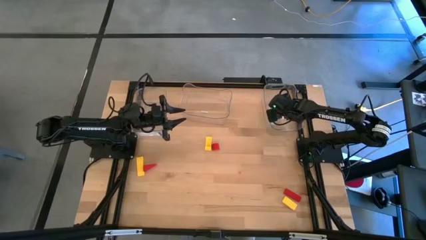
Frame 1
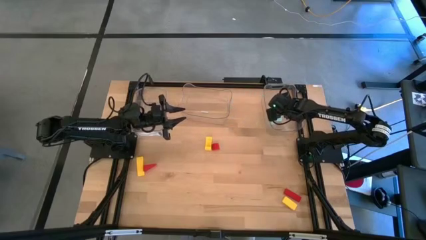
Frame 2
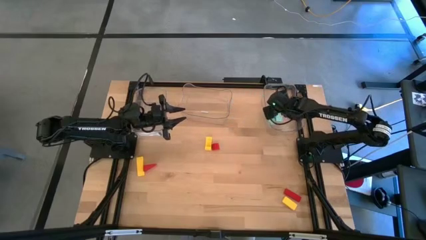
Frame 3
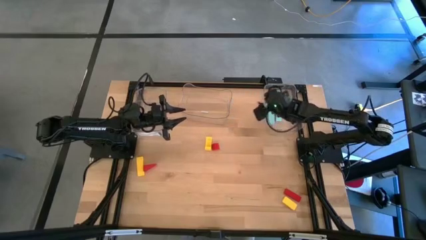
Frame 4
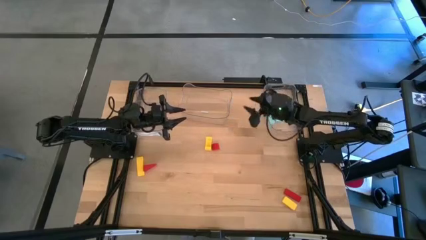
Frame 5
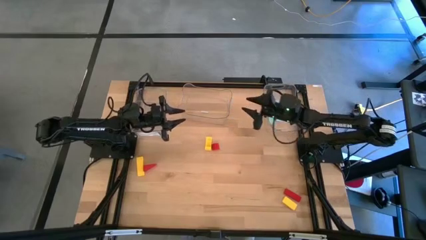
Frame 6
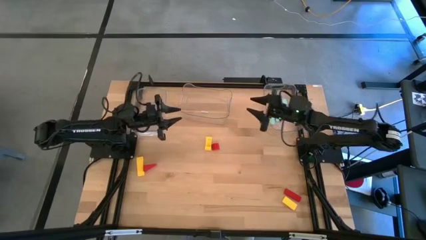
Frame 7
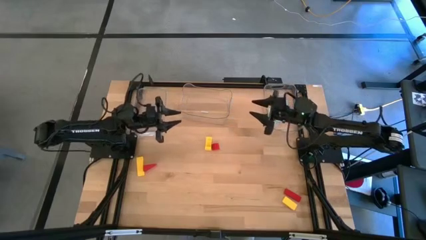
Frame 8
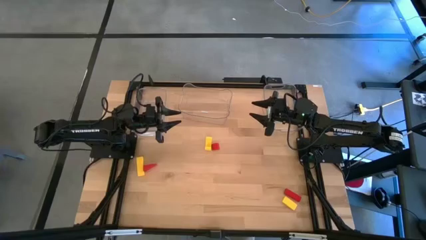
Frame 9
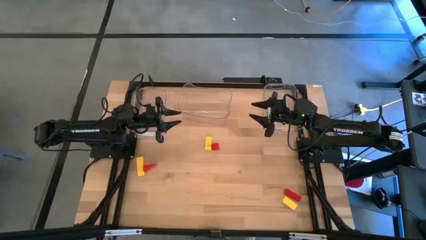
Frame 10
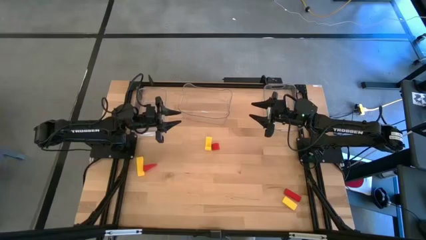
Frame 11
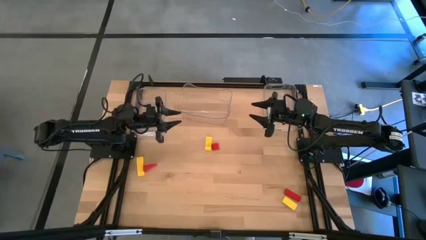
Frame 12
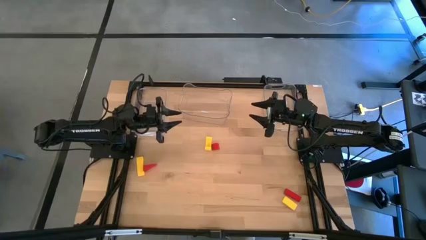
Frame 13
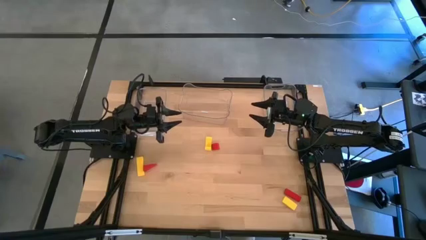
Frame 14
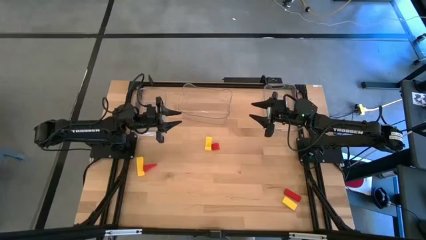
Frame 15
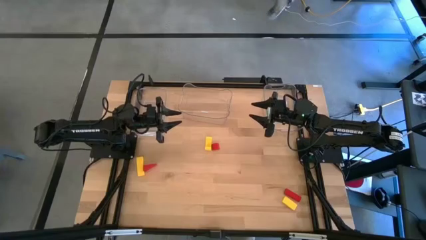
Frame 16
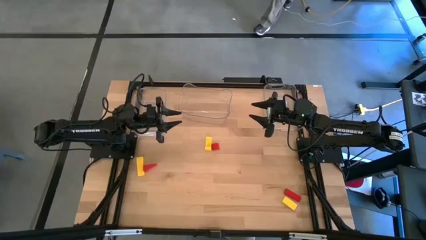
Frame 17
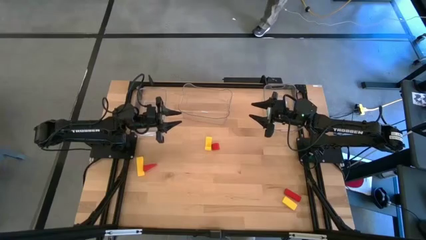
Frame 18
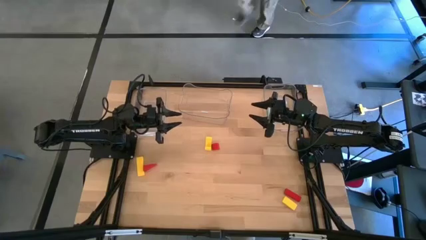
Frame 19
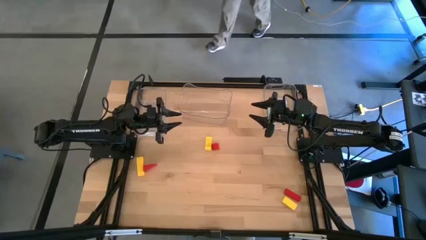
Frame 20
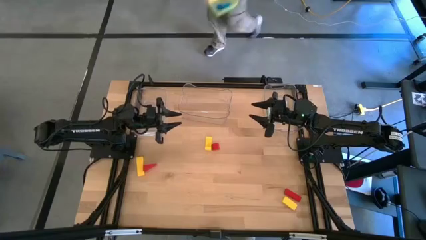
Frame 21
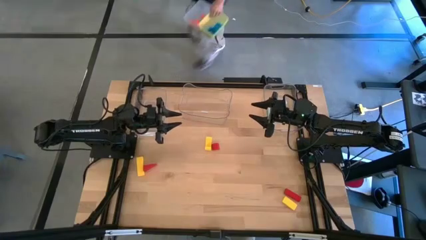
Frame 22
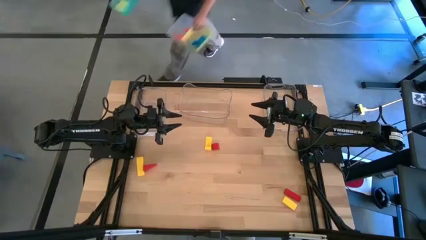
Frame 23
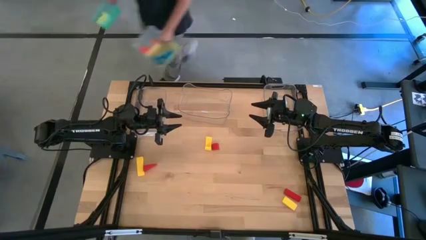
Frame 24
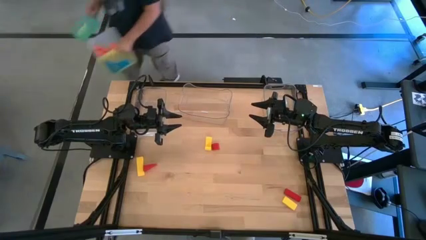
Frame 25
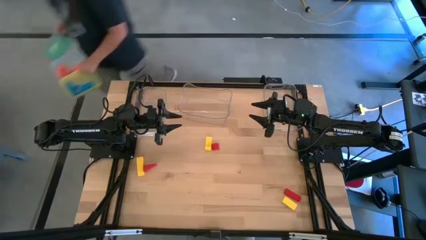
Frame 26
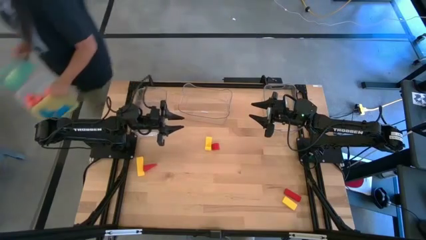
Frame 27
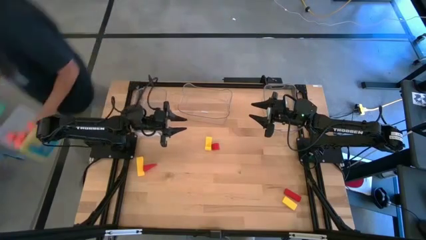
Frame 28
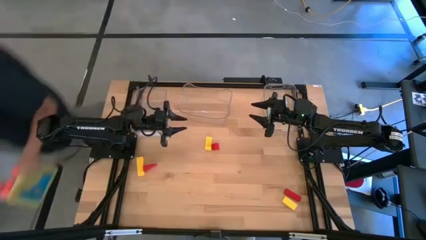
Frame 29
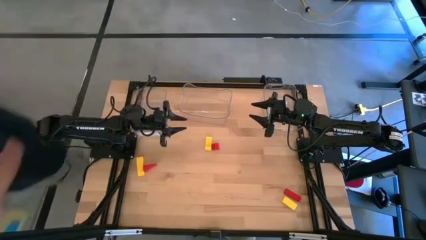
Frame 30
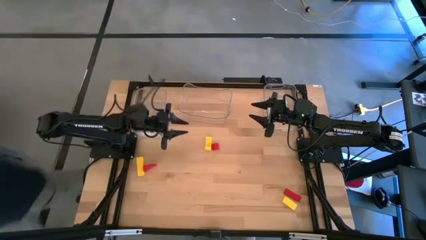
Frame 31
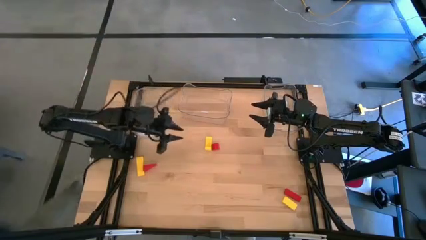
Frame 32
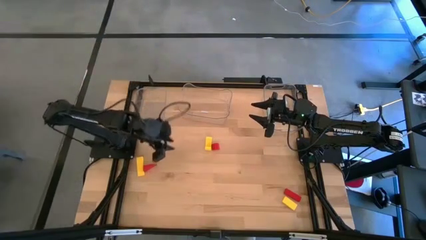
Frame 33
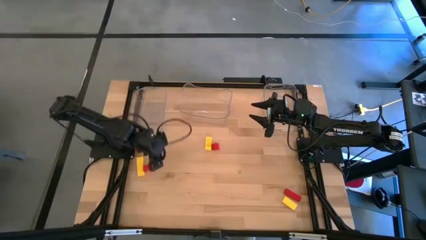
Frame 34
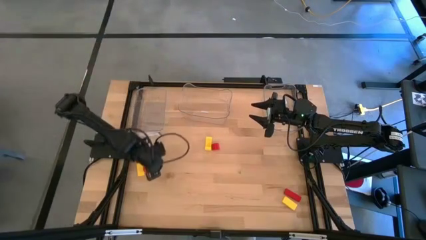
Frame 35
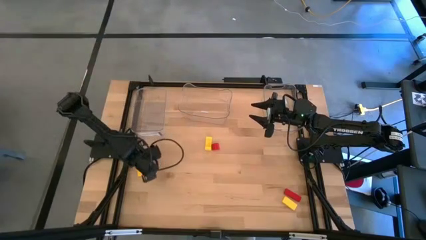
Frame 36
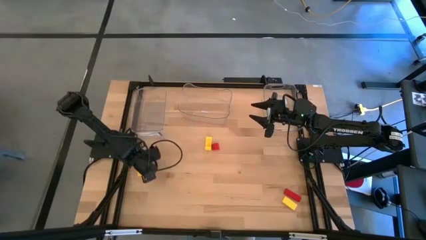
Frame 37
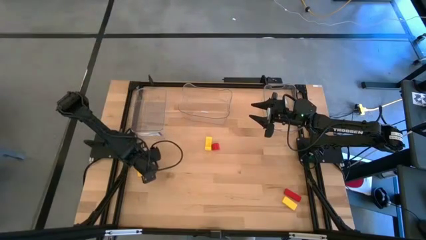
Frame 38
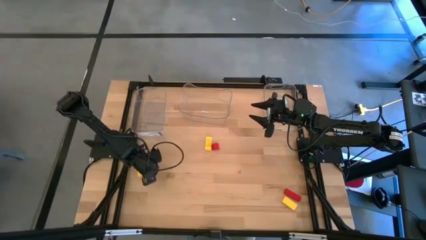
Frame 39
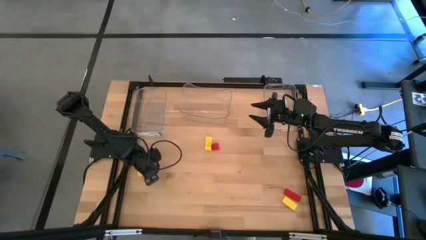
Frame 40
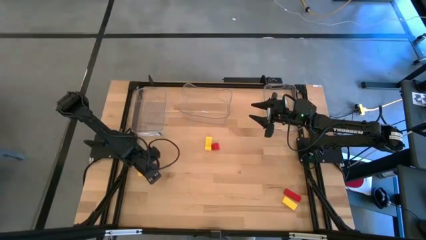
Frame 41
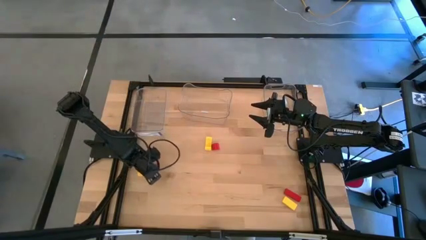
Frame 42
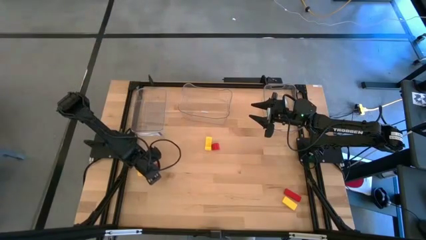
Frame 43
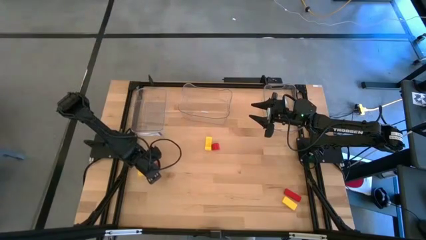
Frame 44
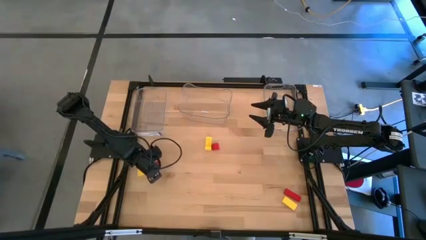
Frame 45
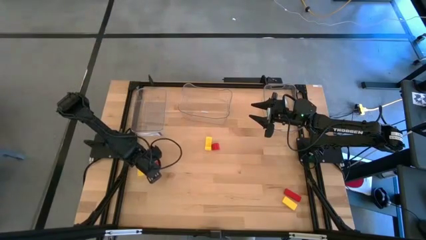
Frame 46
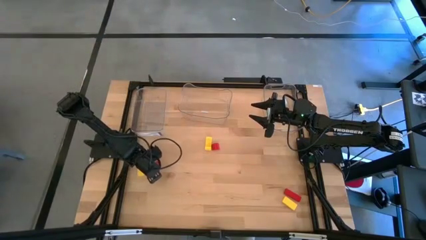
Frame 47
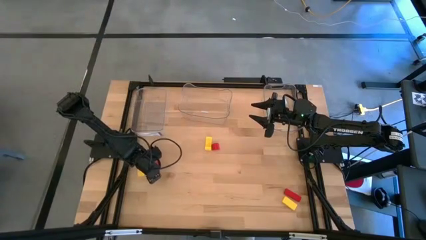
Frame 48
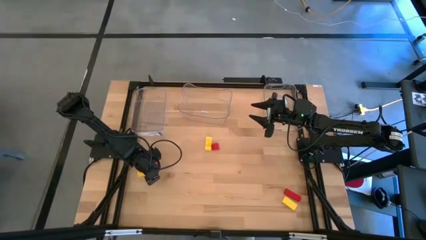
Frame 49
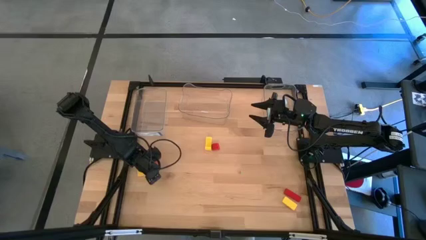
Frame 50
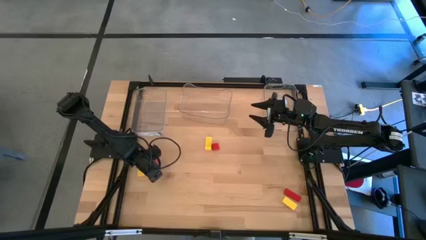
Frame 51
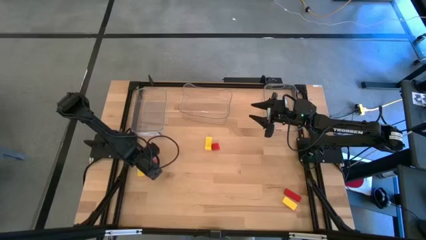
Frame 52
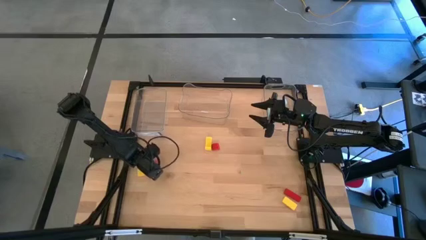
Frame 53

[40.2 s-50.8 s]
Task: Sort & place blocks by color
Put the left red block into the middle transparent bin

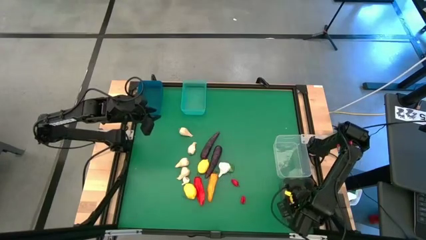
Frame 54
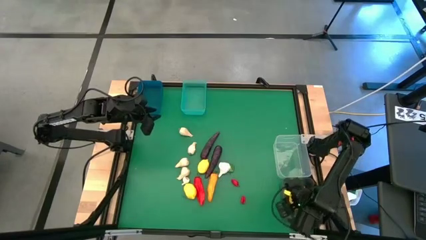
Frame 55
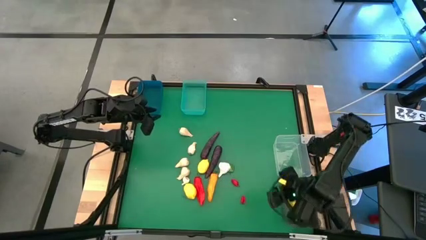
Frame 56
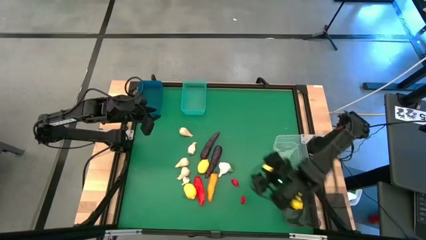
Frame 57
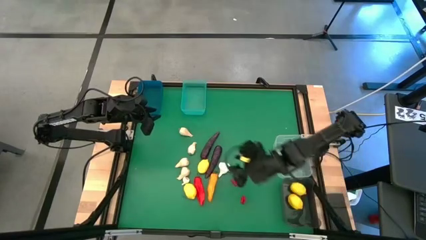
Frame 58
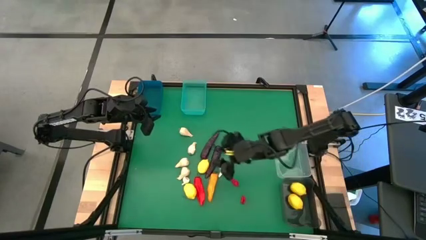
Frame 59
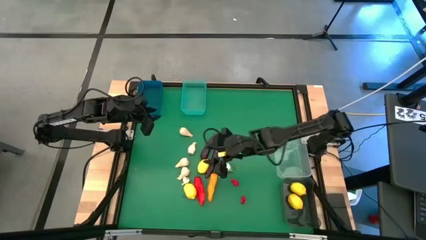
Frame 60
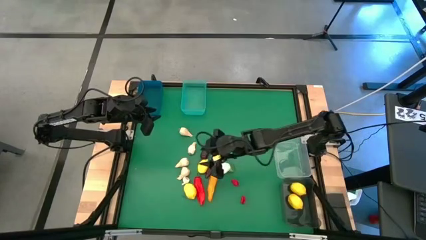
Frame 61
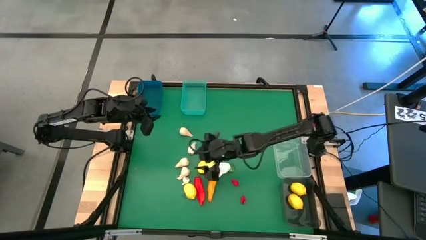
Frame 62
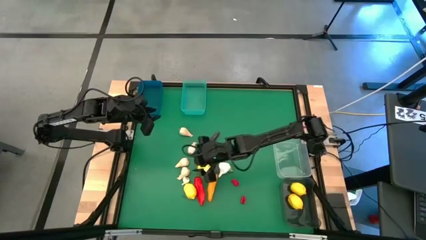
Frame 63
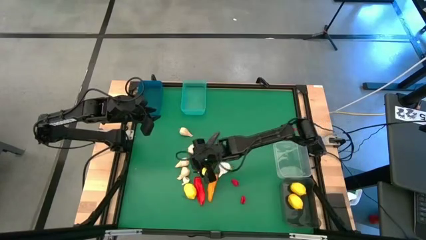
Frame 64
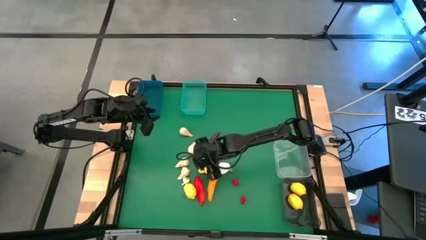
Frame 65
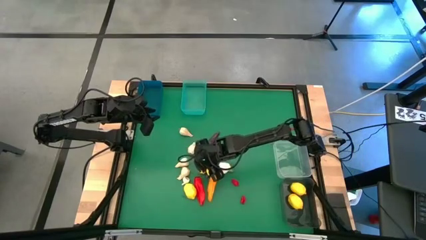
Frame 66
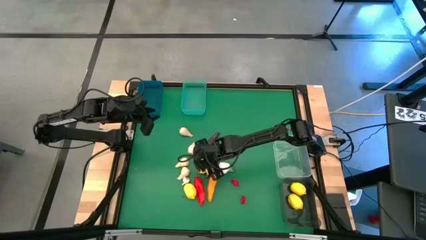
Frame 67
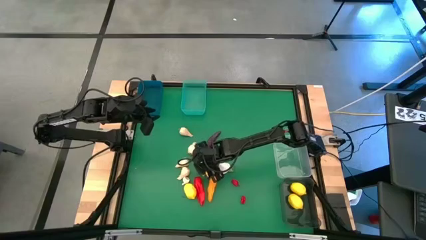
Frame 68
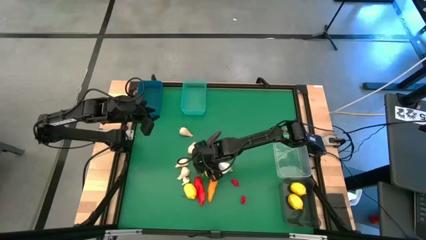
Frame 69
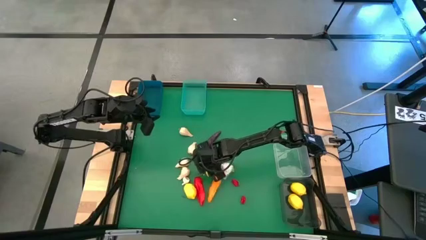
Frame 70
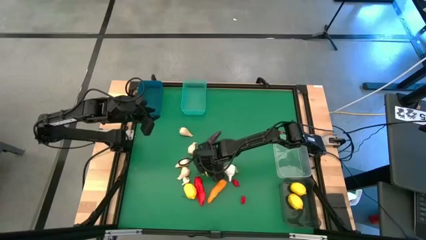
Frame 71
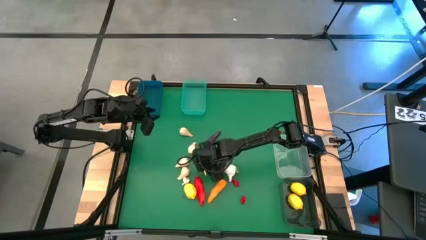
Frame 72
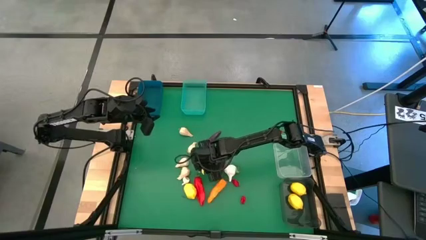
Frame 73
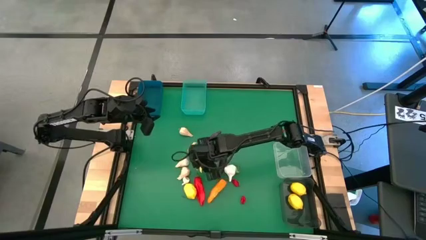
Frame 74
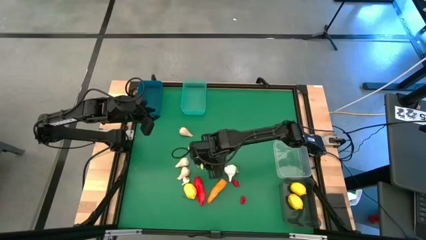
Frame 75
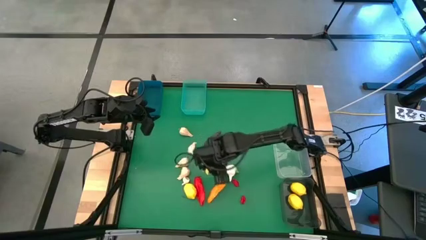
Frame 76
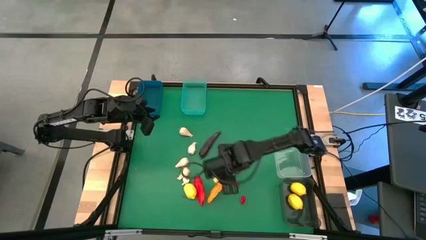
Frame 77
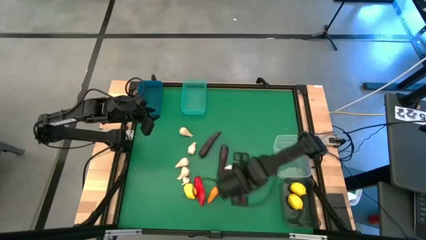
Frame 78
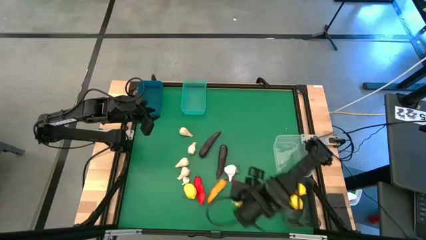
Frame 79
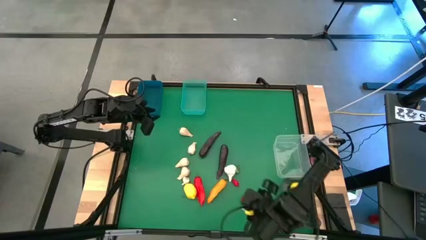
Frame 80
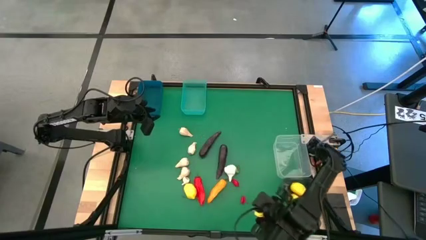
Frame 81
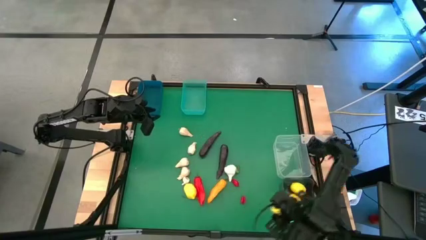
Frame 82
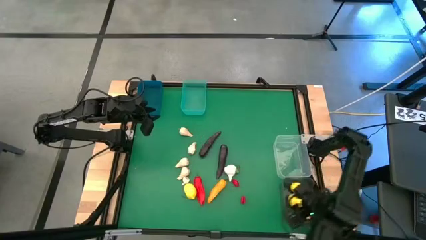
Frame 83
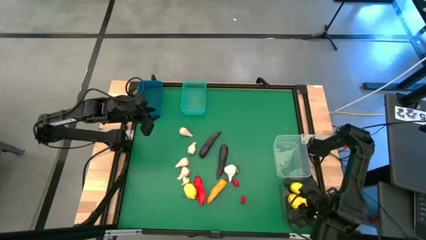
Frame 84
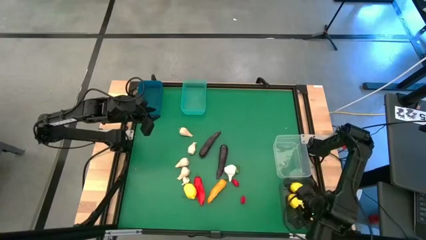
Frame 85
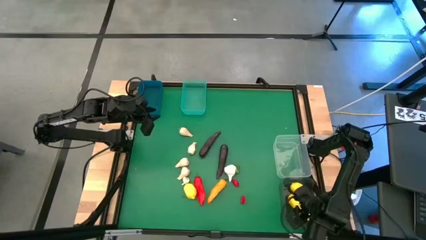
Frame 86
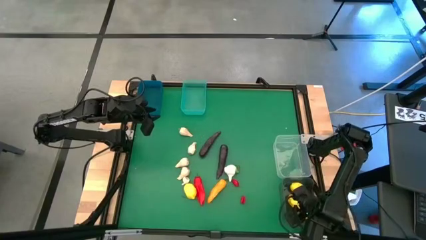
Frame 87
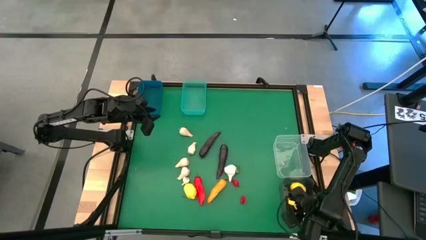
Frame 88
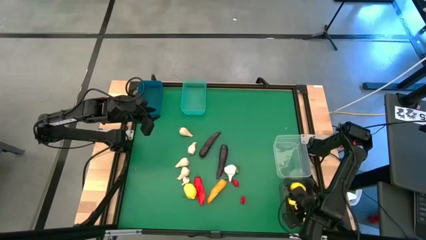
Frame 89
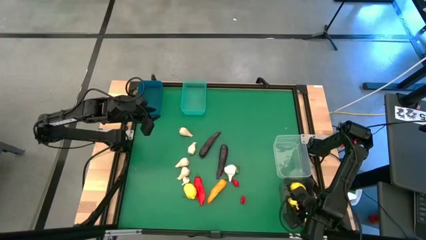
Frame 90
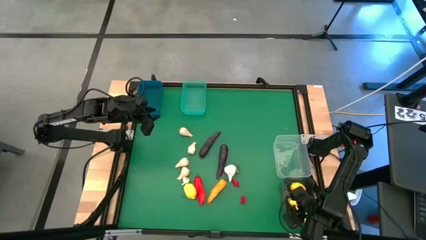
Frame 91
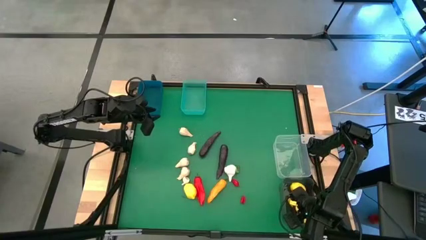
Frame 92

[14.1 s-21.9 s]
Task: Sort produce into baskets
Put the yellow lemon into the black bin
